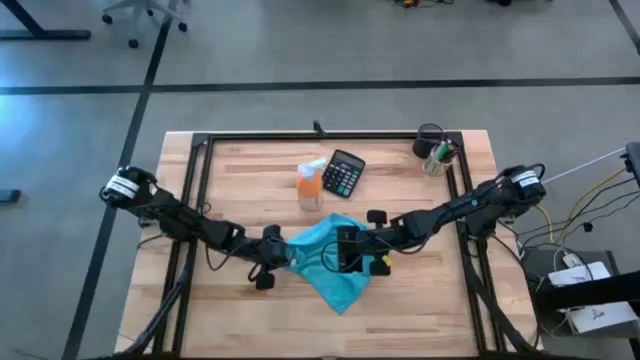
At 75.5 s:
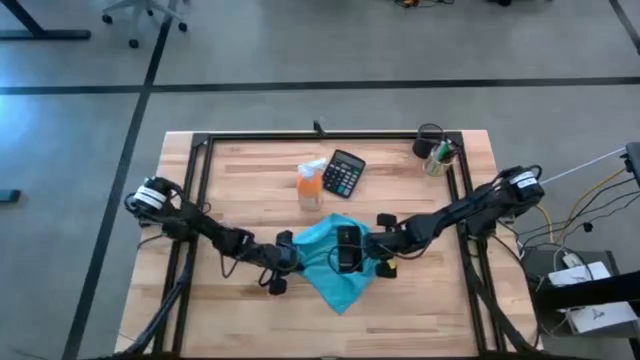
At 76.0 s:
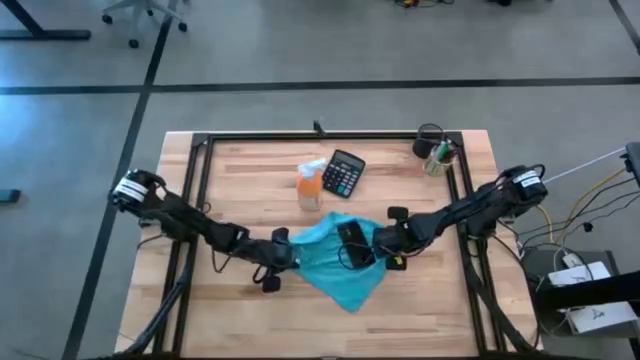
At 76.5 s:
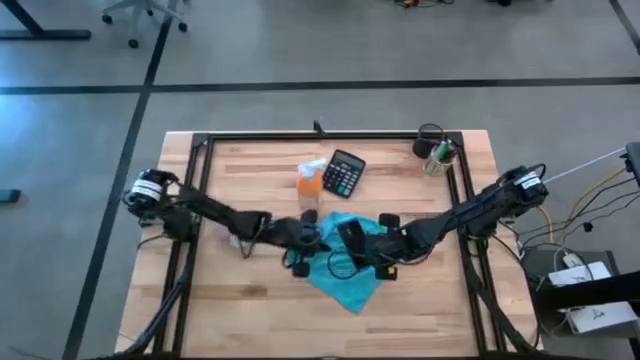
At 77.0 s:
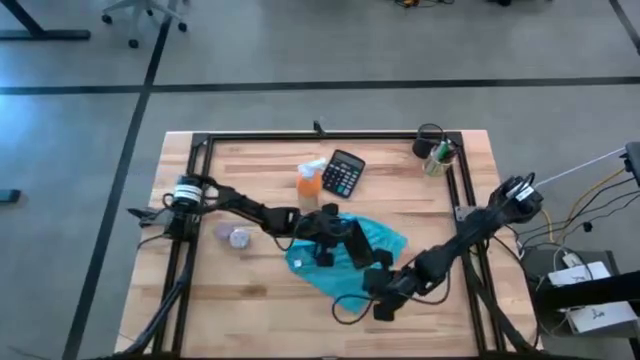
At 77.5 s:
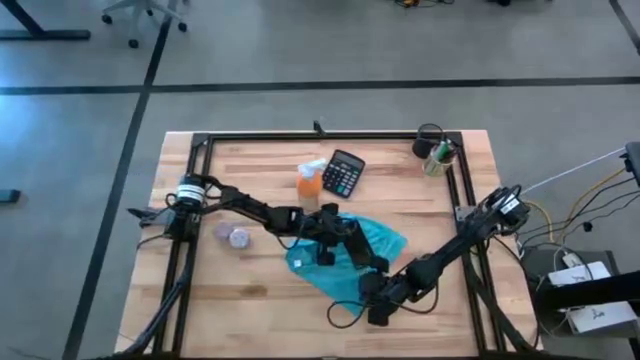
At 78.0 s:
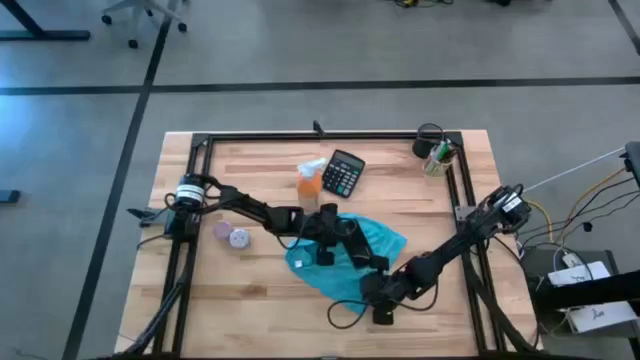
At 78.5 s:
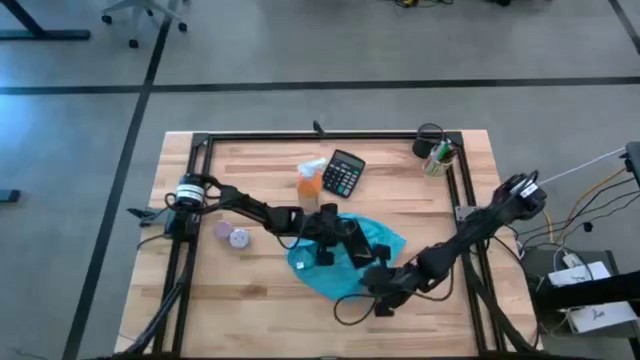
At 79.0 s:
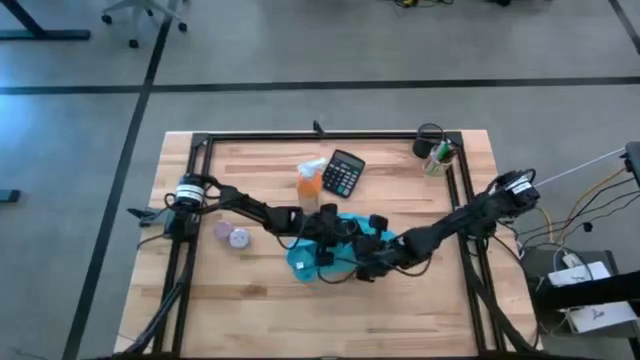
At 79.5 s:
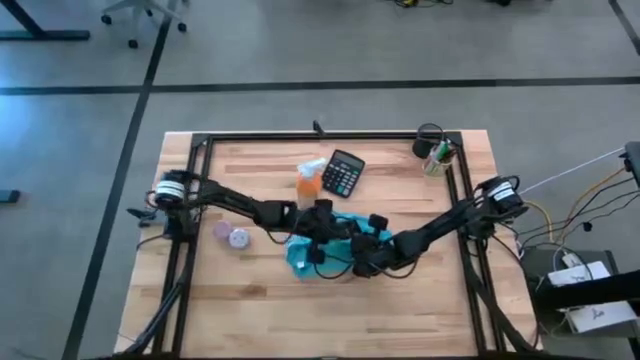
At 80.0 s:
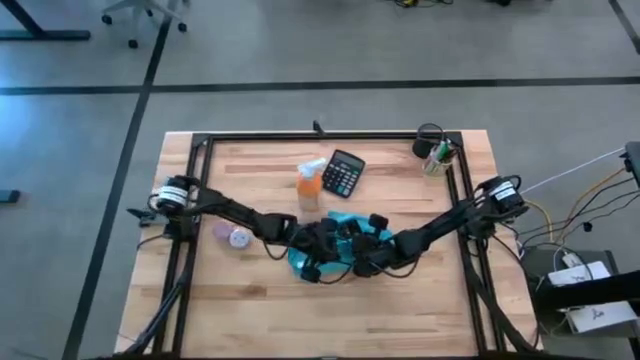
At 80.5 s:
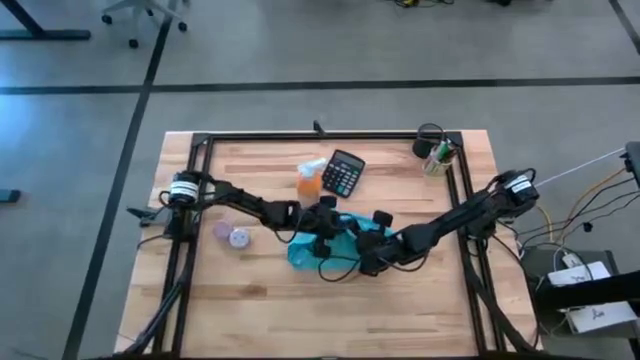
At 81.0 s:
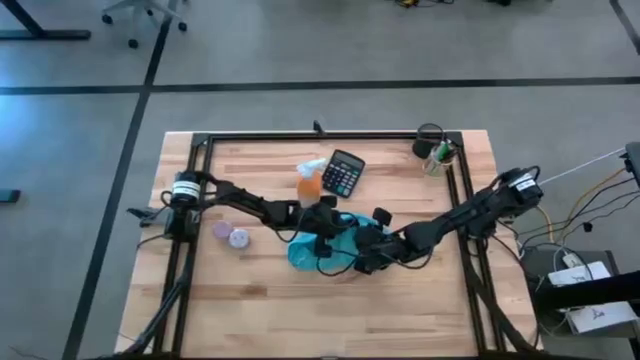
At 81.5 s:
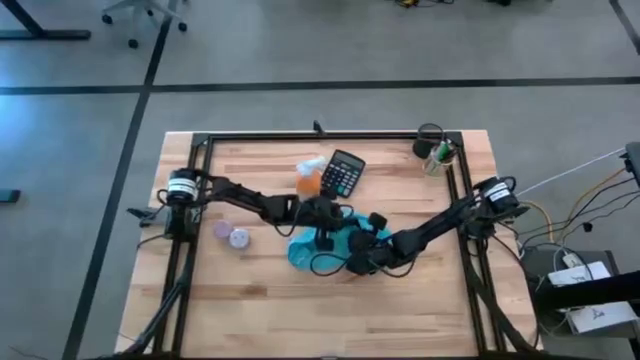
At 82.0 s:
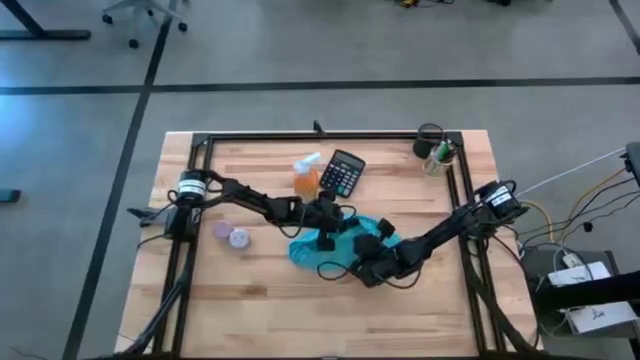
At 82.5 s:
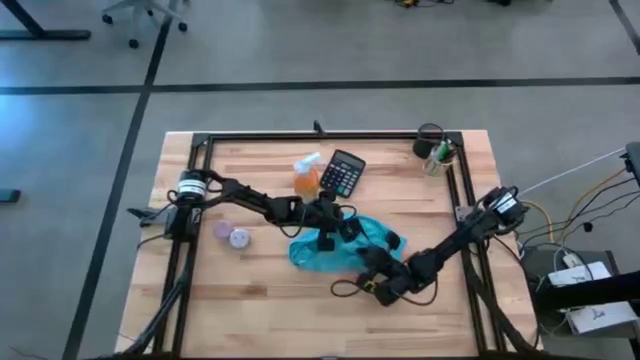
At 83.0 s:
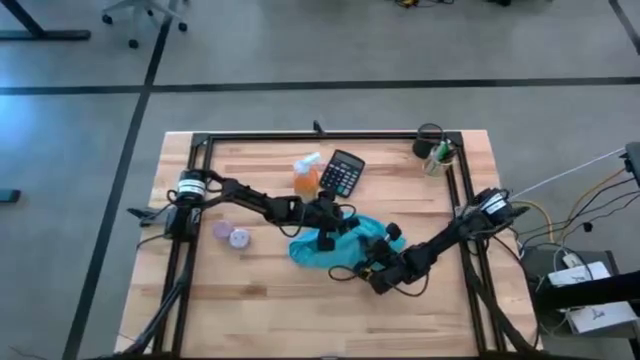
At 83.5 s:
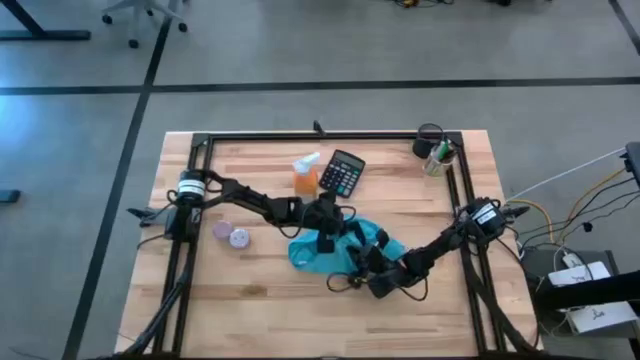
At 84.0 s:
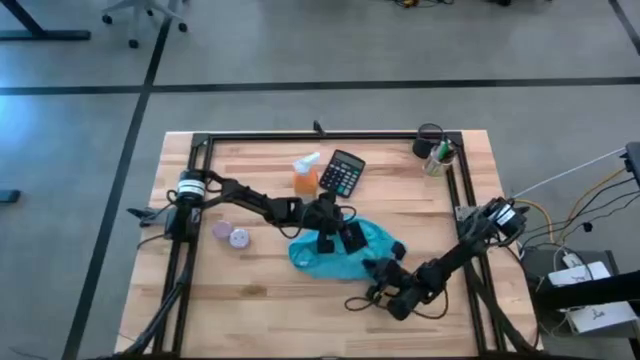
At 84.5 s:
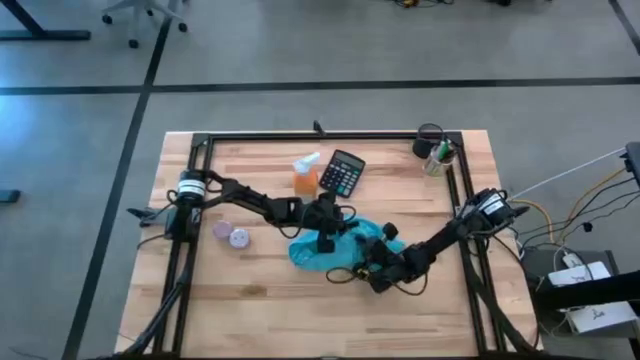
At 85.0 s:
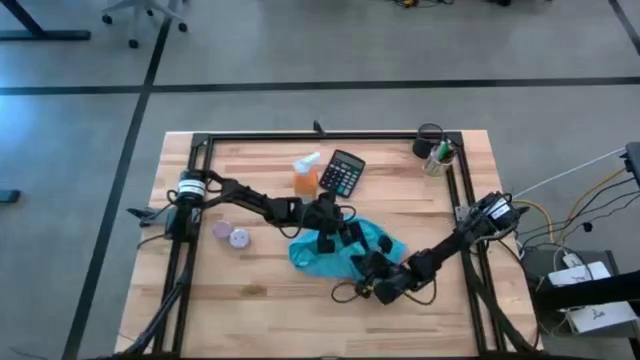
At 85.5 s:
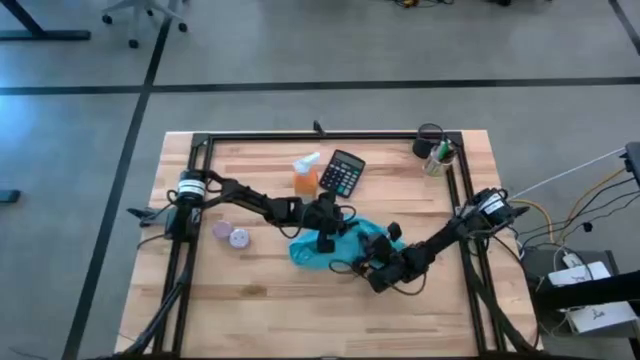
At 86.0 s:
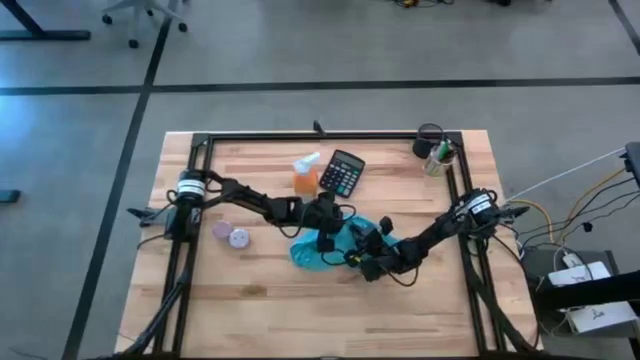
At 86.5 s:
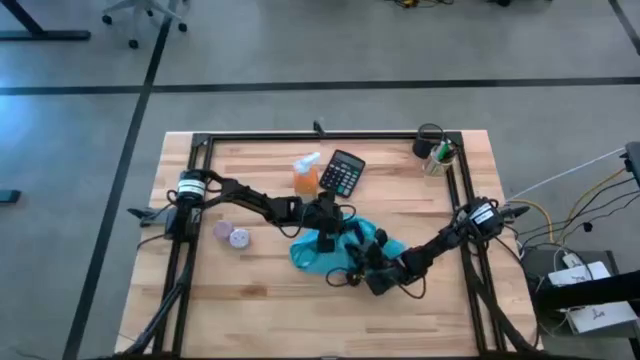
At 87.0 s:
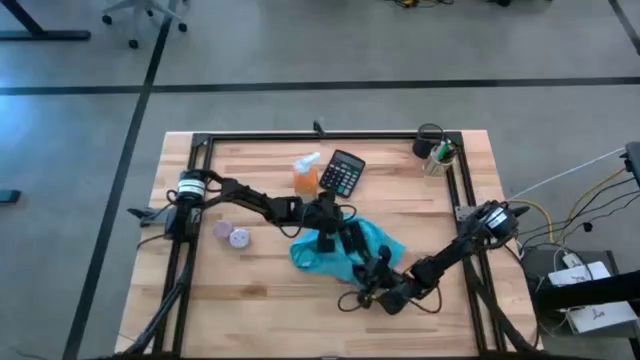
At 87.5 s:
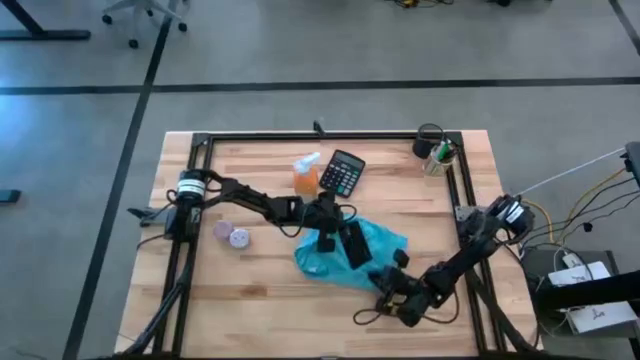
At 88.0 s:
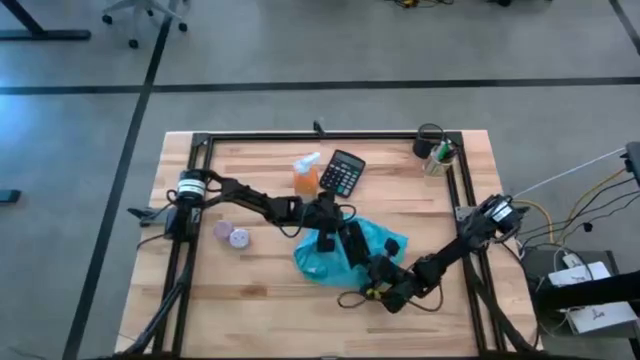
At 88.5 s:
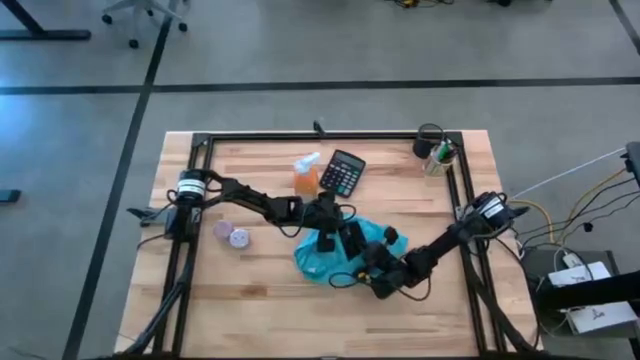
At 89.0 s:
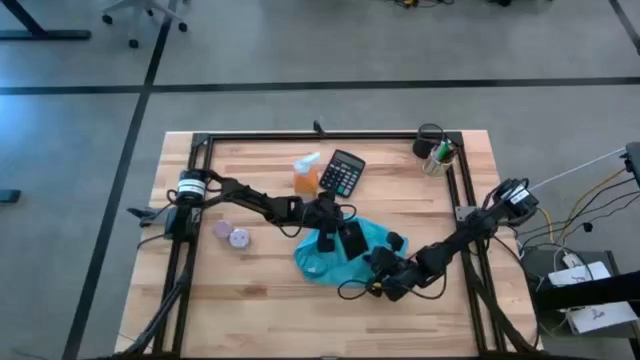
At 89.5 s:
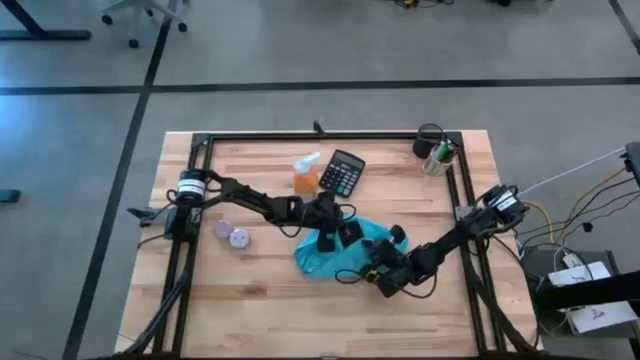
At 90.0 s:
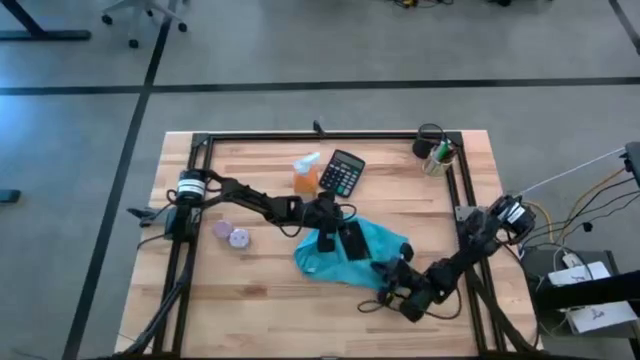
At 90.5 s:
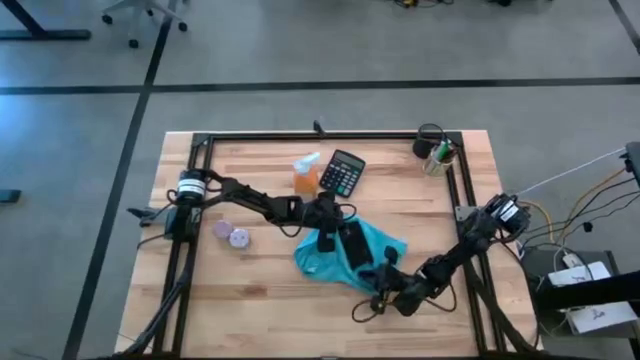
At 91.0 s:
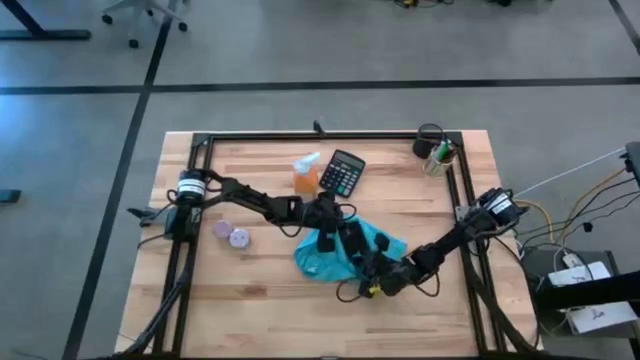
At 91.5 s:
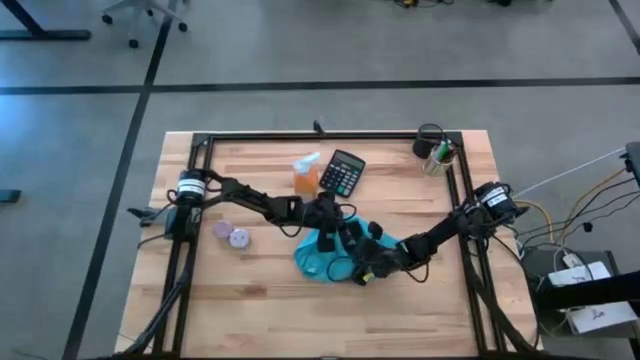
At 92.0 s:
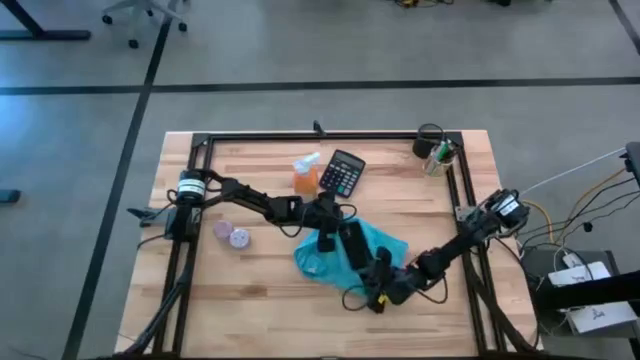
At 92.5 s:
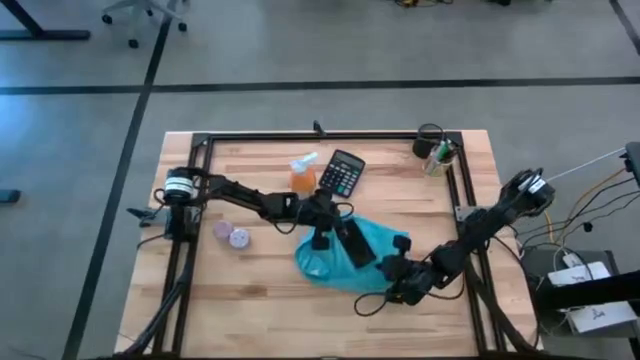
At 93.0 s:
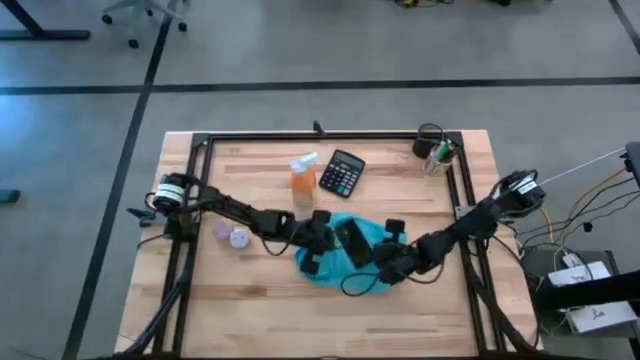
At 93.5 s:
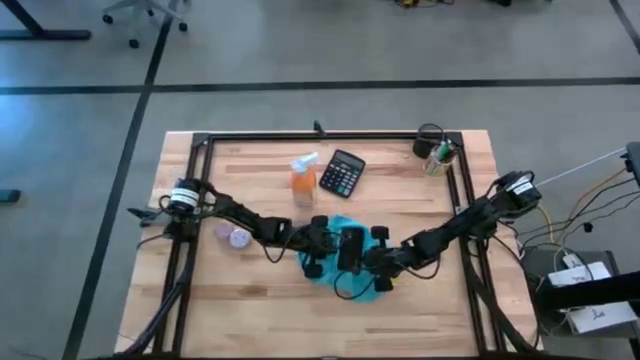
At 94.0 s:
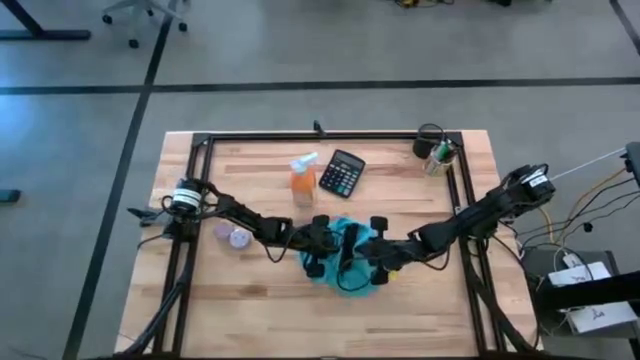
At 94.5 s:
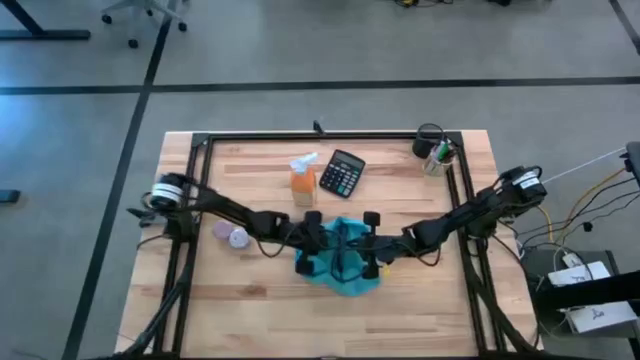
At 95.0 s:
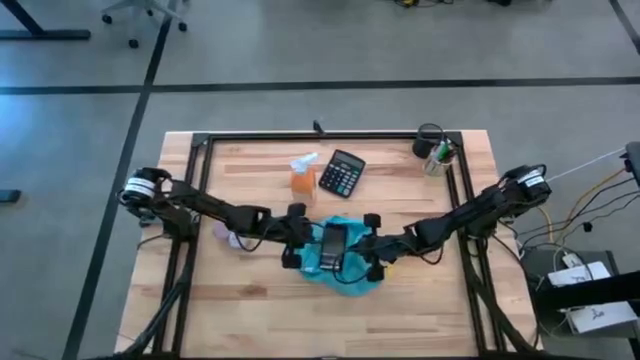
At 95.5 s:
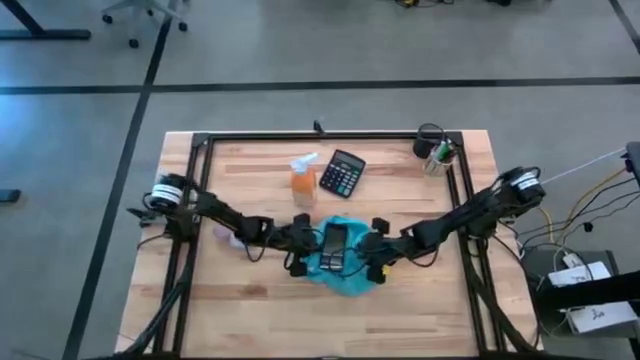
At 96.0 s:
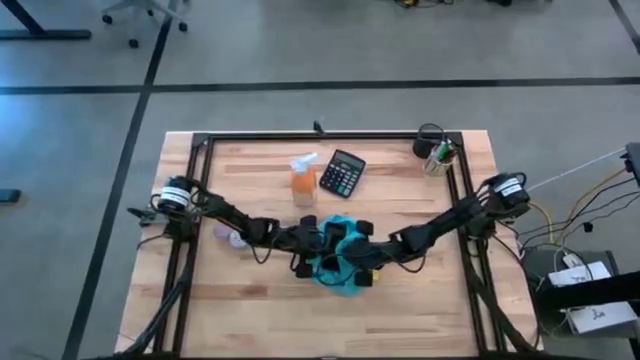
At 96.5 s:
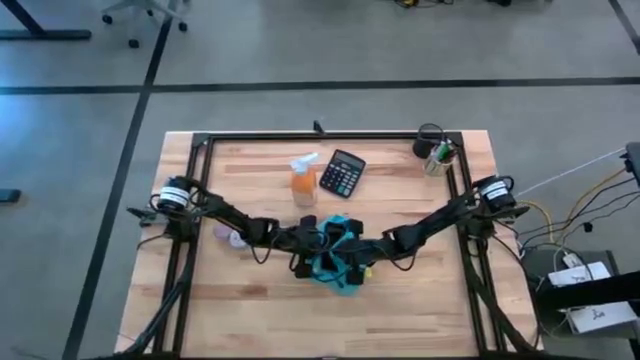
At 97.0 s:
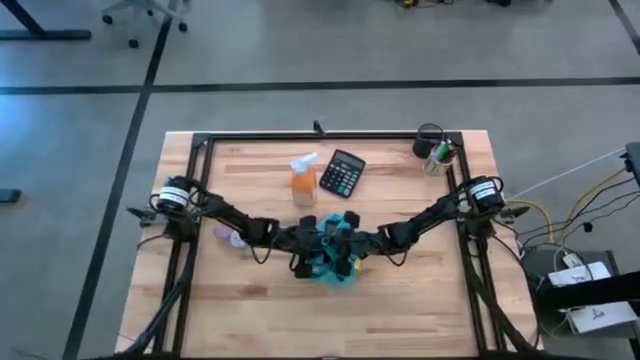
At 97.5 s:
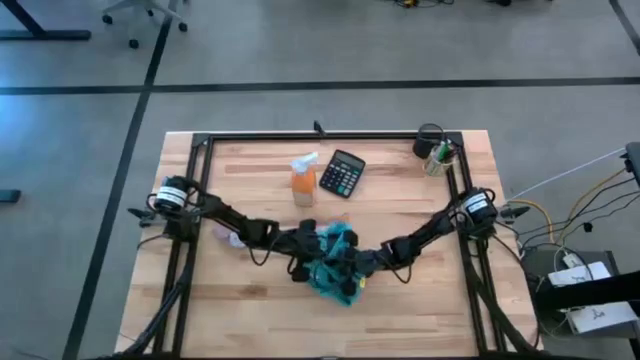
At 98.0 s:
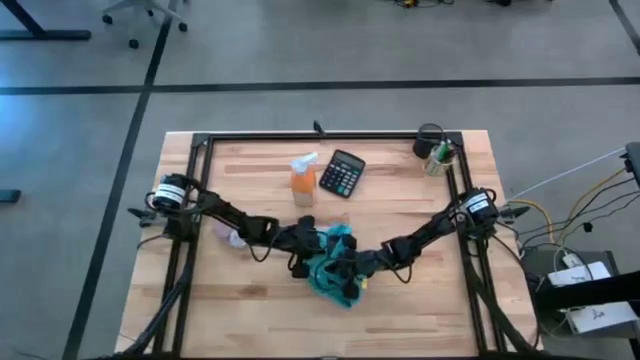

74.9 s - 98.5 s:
Task: Apply microfiber cloth
Wipe the front and back of the black cellphone with the blue microfiber cloth
